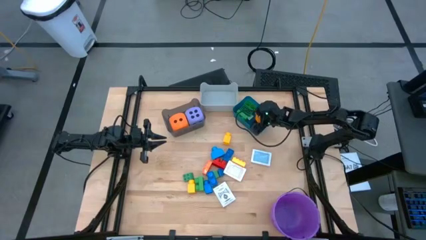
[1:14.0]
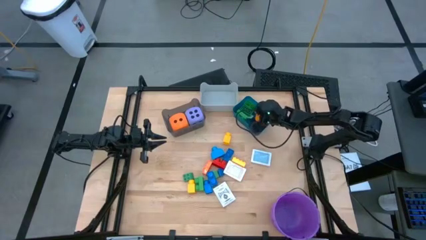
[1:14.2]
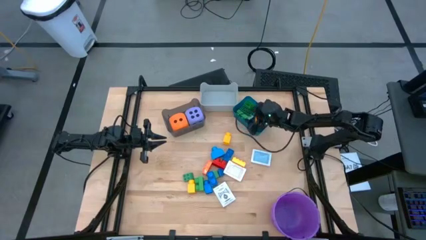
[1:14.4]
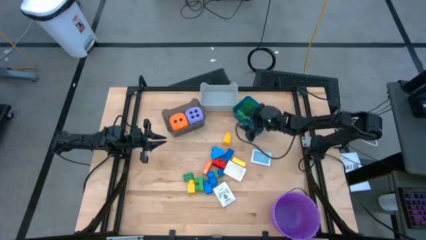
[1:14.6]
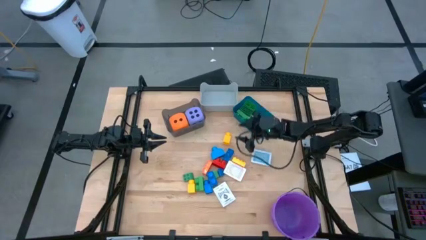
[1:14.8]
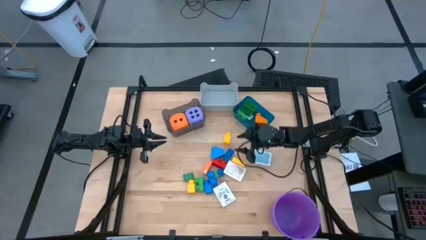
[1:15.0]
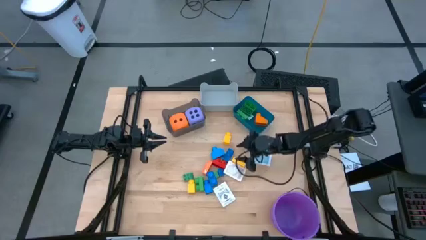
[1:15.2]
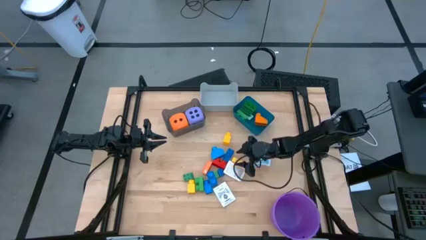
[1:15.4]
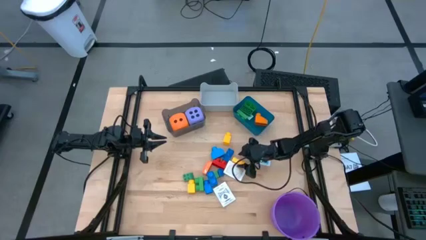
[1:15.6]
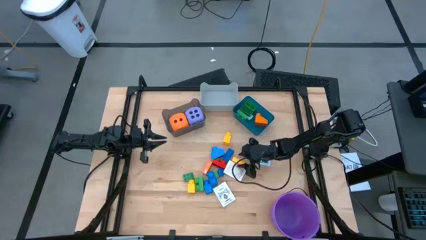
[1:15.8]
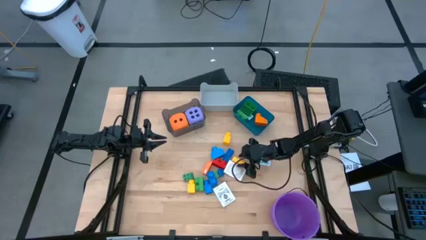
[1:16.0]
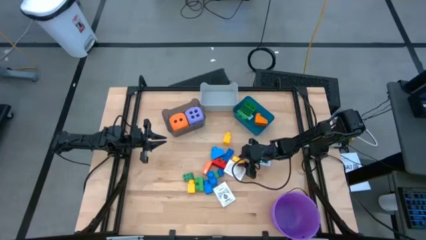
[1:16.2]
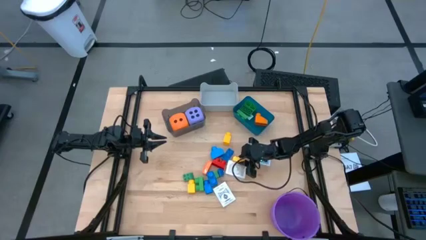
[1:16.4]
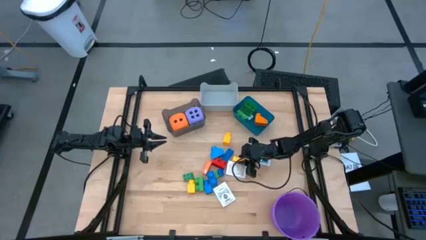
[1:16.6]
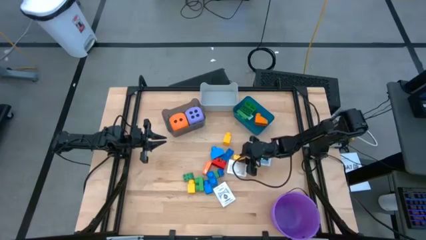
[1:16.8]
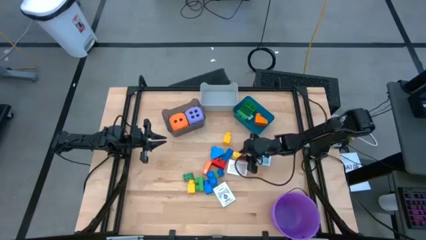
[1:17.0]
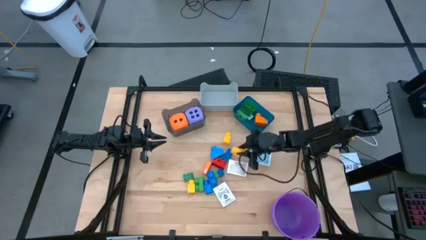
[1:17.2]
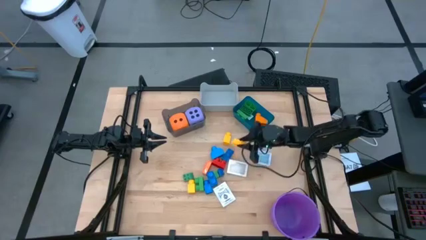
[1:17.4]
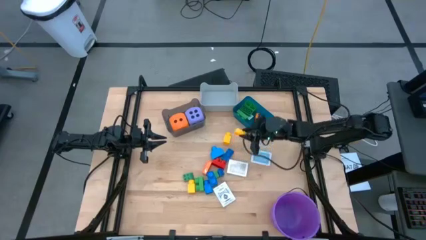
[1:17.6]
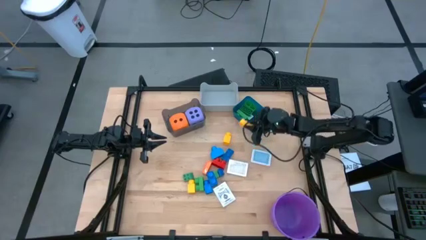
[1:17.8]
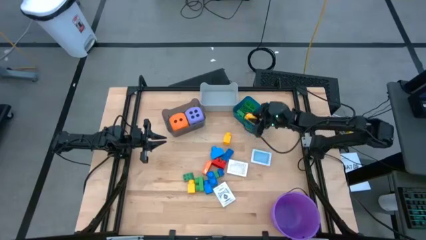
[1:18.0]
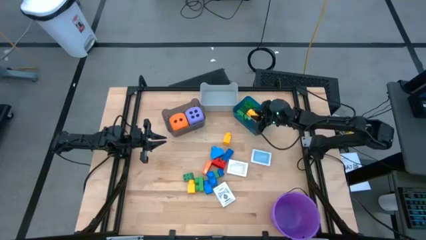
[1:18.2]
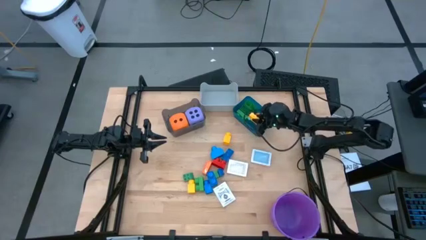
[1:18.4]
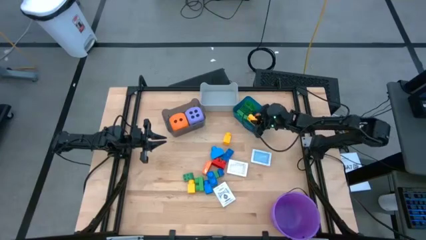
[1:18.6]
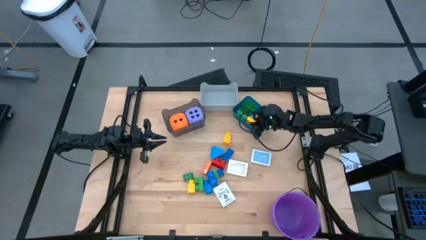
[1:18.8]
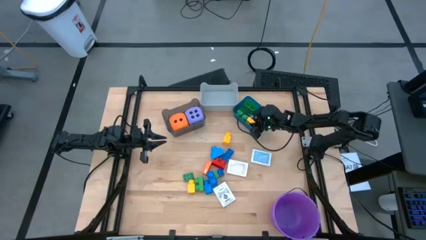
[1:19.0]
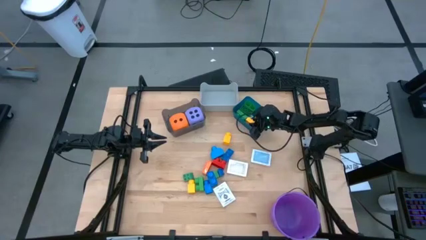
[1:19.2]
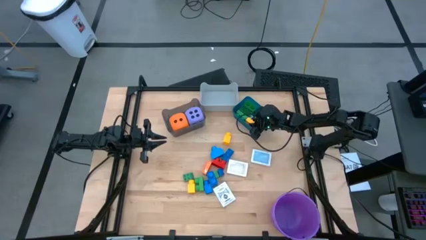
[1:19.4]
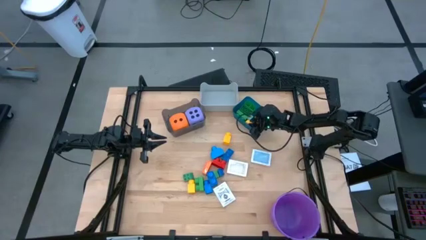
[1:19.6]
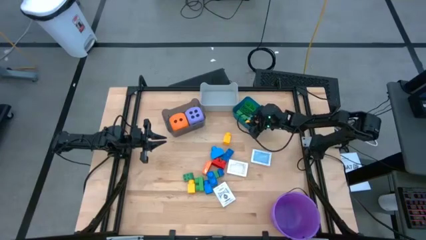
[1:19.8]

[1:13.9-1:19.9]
Task: Pick & Place Toys
Put the yellow 8 studs game piece into the blue bin

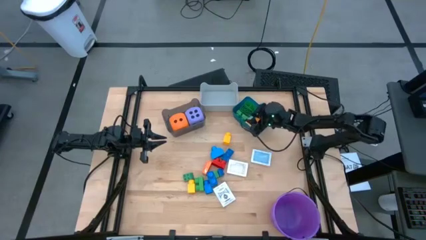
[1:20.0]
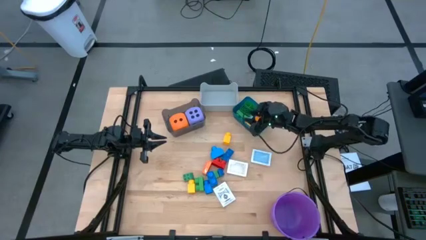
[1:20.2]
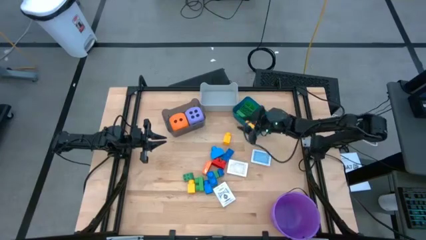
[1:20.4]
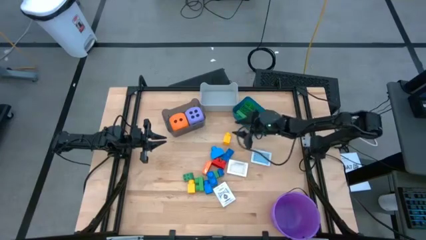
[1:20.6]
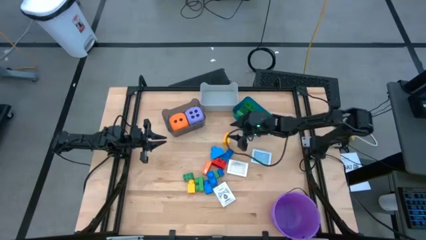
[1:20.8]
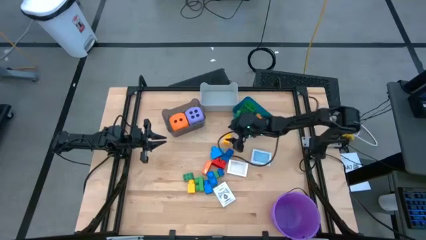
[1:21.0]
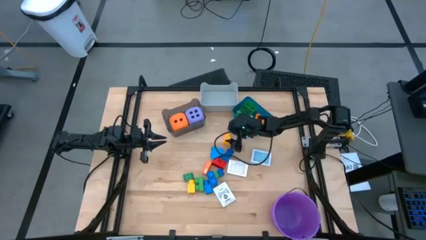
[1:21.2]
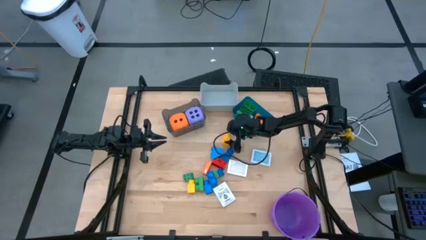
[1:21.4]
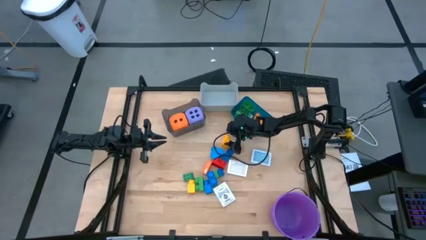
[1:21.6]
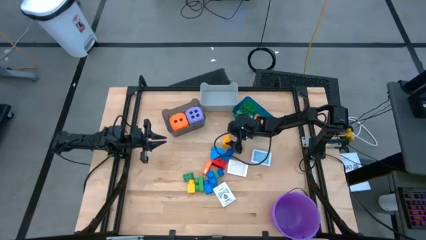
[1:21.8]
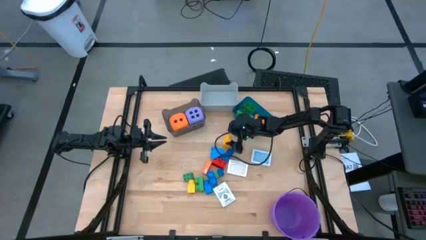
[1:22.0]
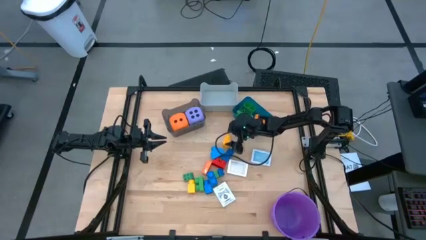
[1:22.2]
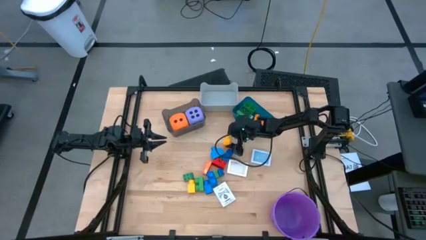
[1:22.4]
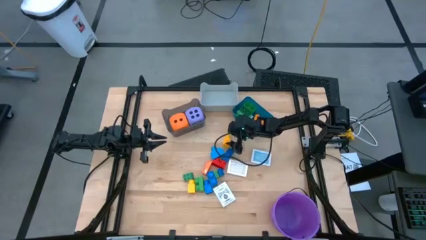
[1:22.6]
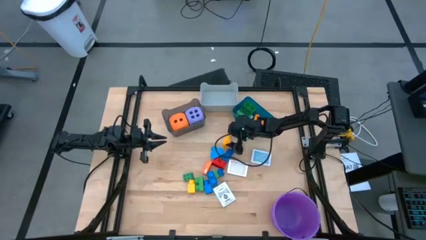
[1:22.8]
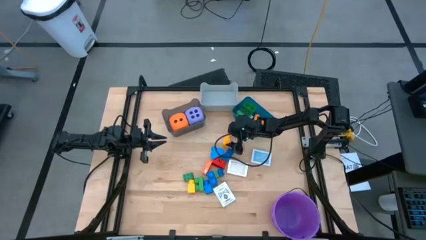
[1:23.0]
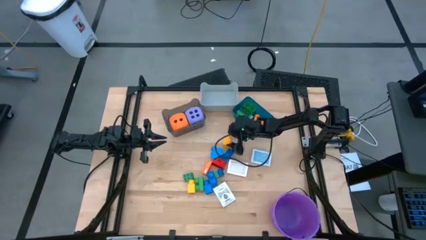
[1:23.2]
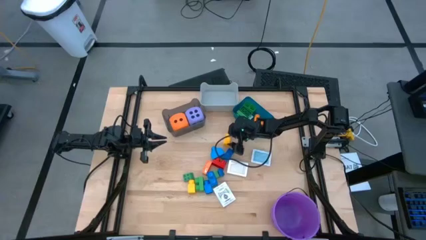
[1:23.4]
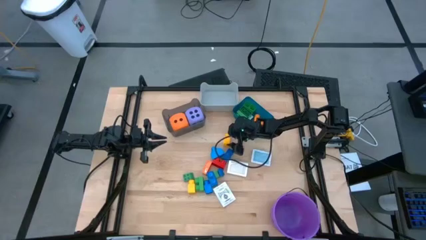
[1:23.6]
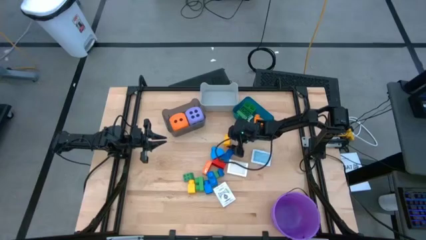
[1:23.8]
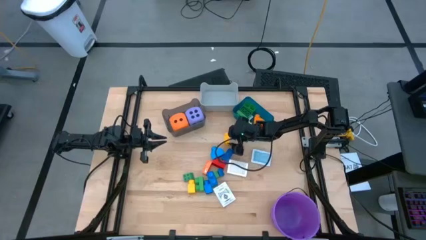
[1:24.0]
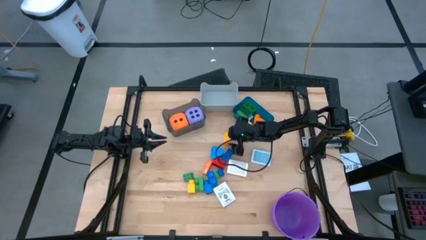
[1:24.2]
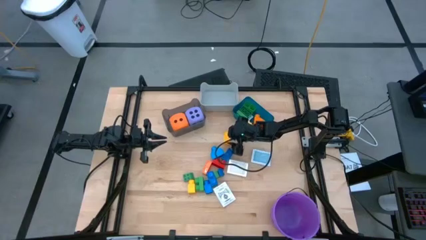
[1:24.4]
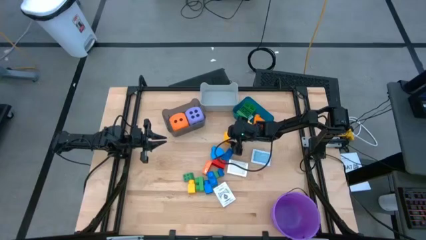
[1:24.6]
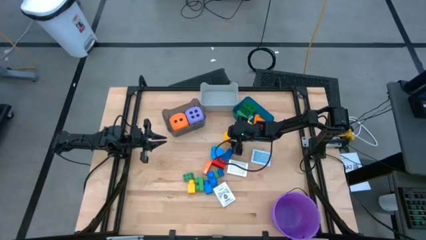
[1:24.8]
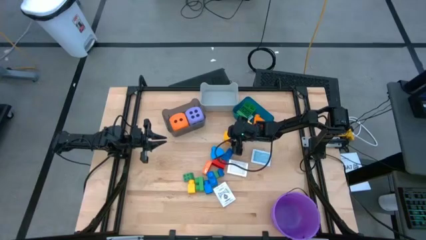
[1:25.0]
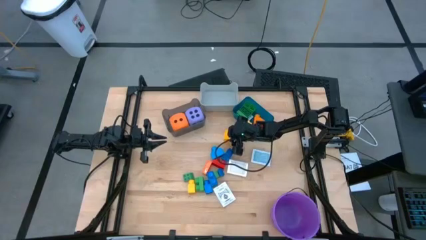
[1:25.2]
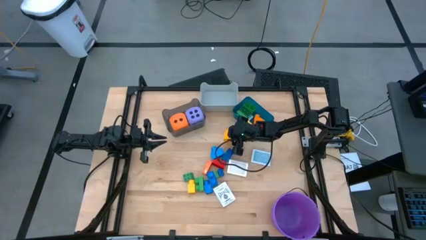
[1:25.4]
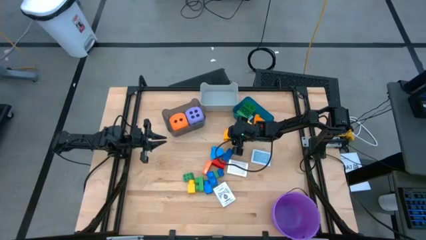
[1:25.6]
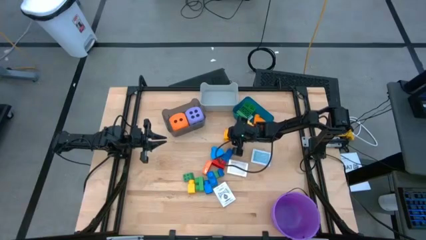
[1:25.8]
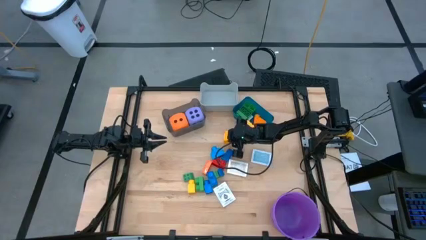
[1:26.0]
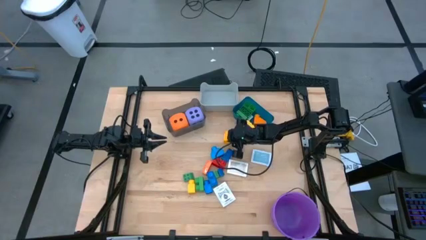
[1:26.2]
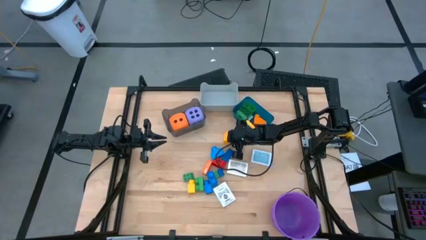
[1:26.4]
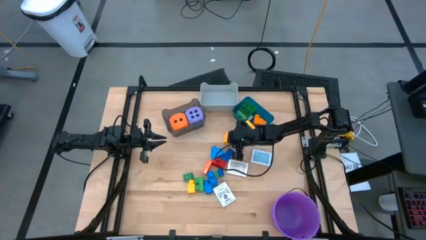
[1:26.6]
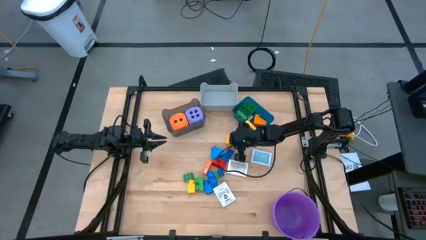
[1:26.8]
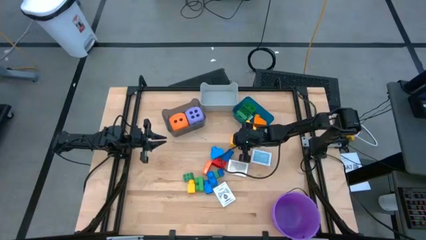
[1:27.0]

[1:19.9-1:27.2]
Put the top yellow 1 stud game piece into the blue bin

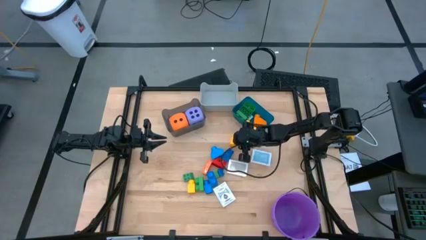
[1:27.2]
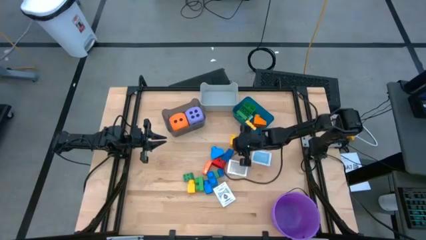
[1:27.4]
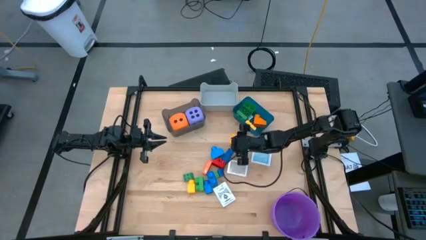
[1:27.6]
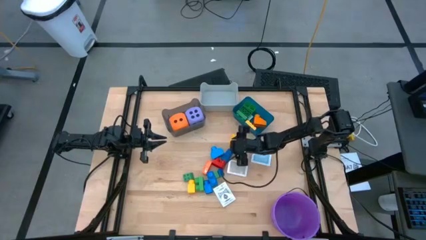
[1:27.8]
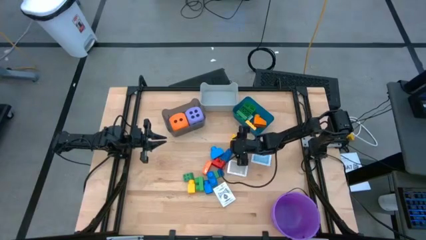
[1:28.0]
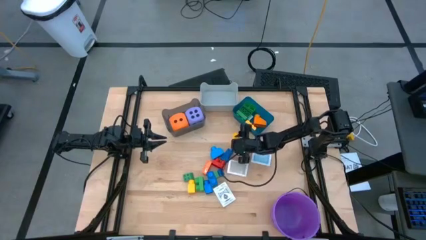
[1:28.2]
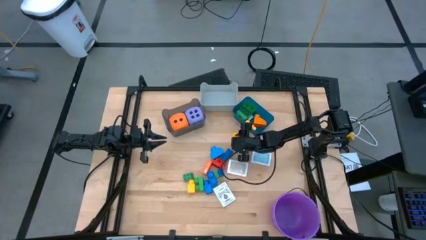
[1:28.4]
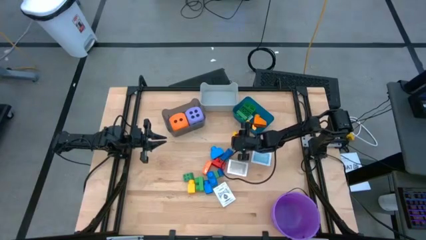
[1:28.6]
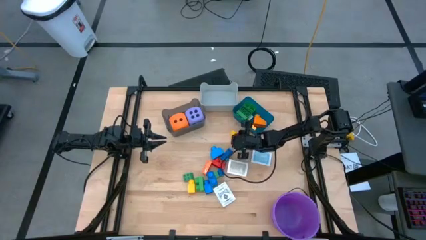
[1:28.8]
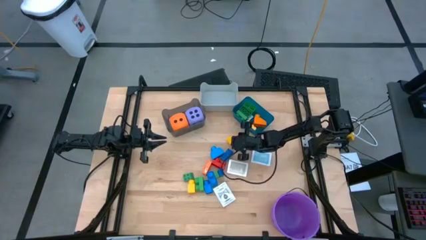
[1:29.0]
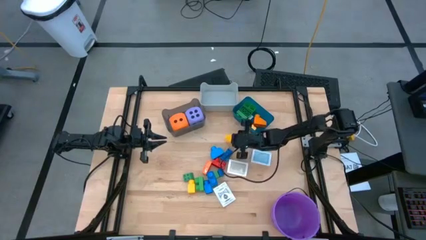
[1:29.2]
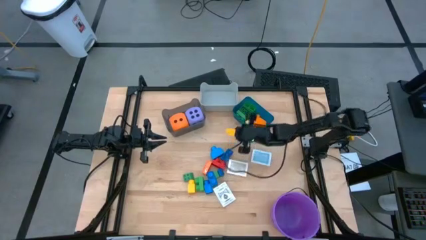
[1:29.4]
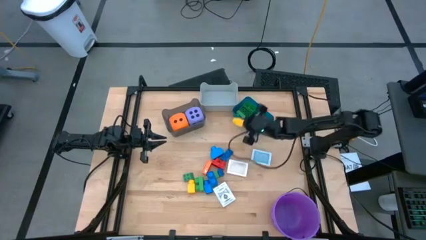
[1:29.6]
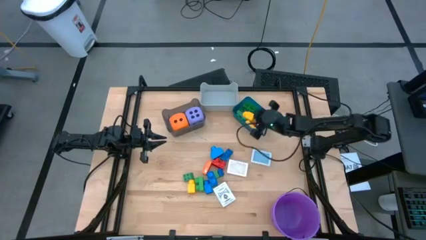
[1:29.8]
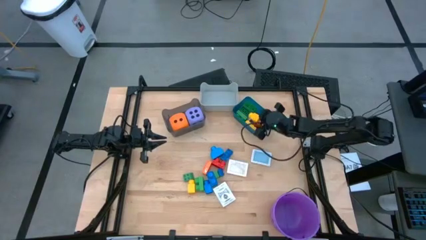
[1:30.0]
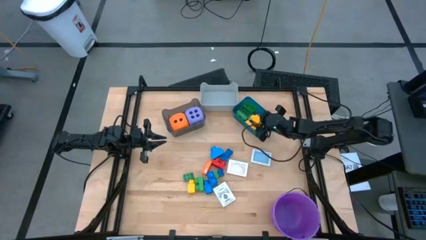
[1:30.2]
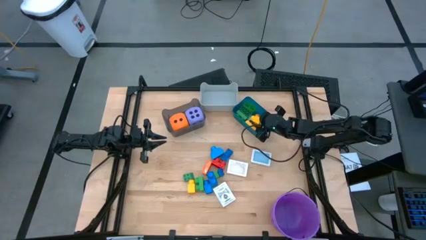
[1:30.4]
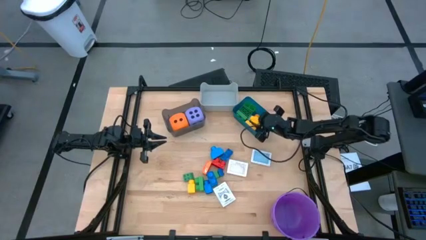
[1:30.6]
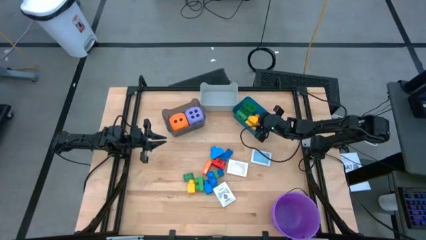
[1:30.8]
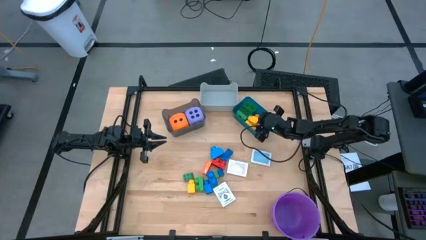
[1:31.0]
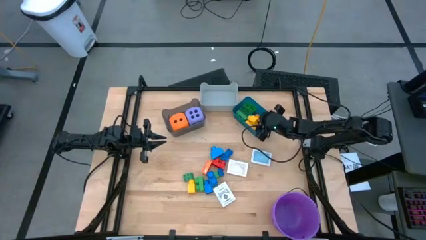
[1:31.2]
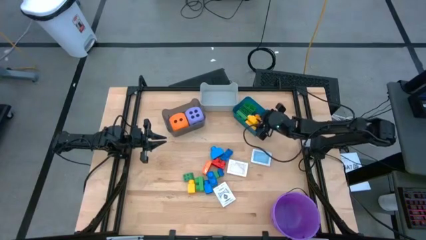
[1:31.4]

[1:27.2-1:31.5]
Put the top yellow 1 stud game piece into the blue bin
